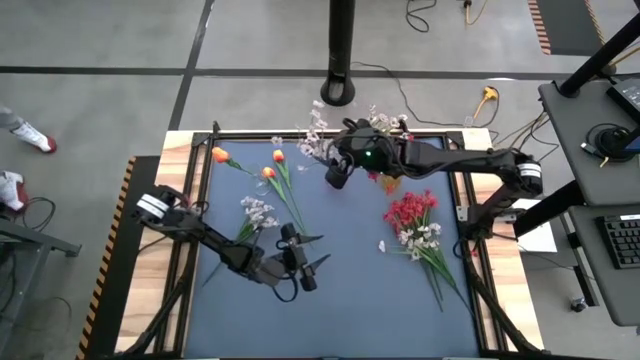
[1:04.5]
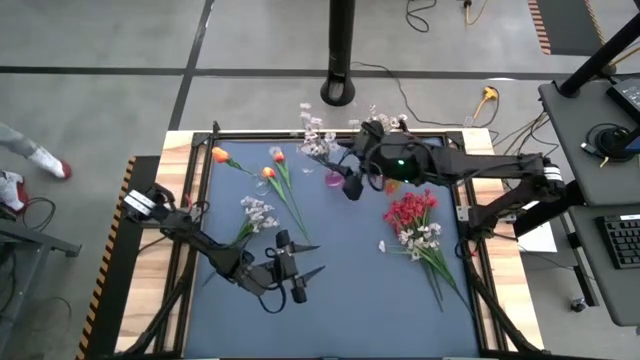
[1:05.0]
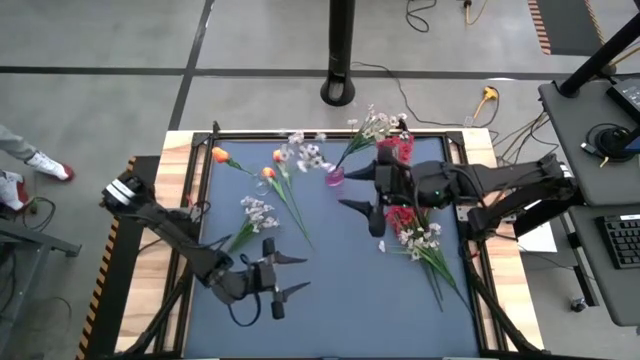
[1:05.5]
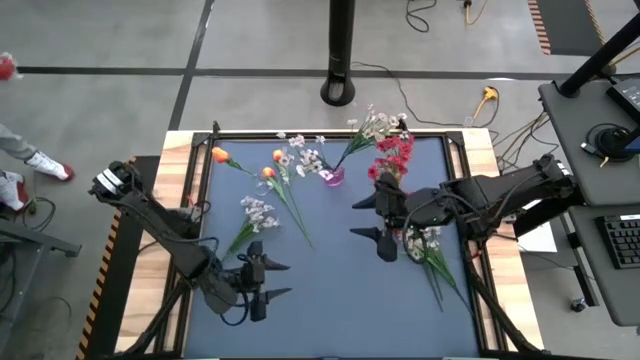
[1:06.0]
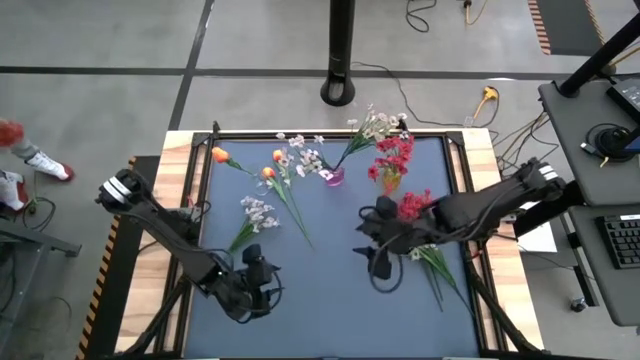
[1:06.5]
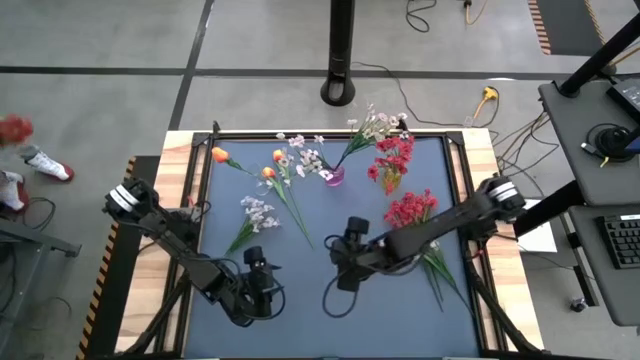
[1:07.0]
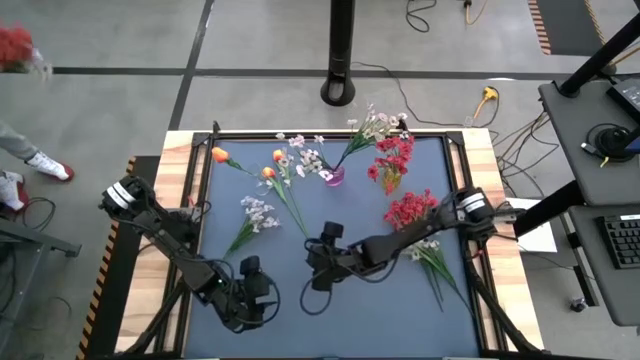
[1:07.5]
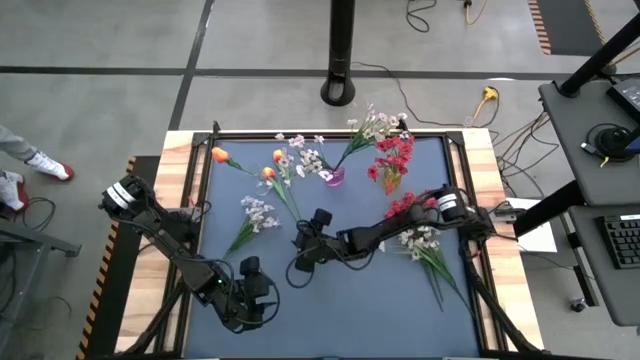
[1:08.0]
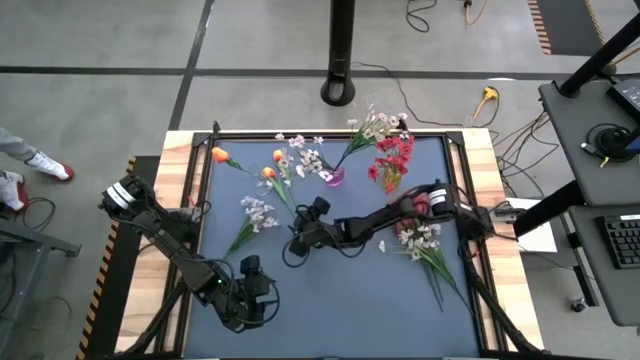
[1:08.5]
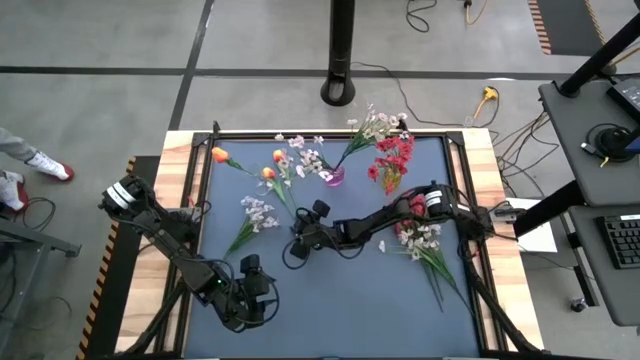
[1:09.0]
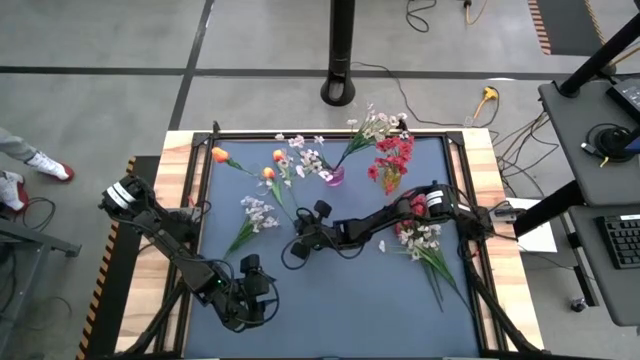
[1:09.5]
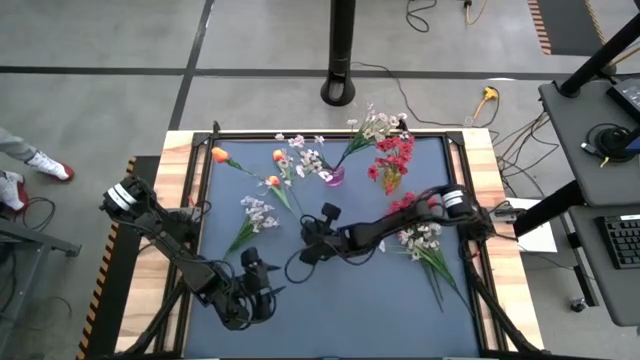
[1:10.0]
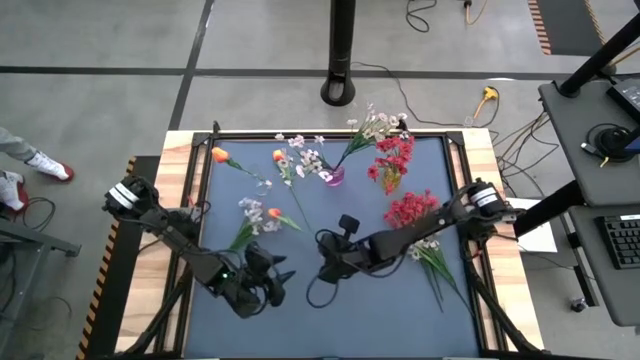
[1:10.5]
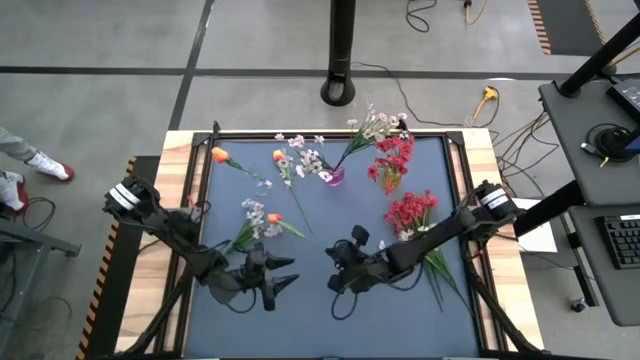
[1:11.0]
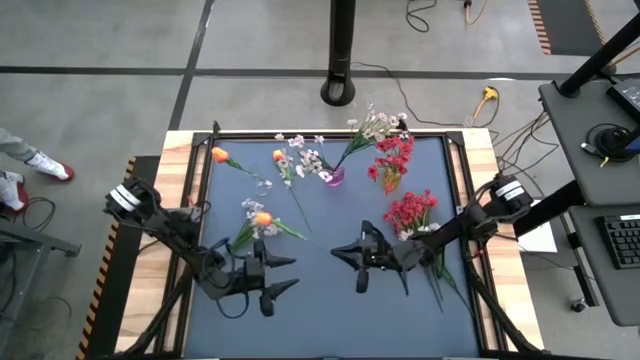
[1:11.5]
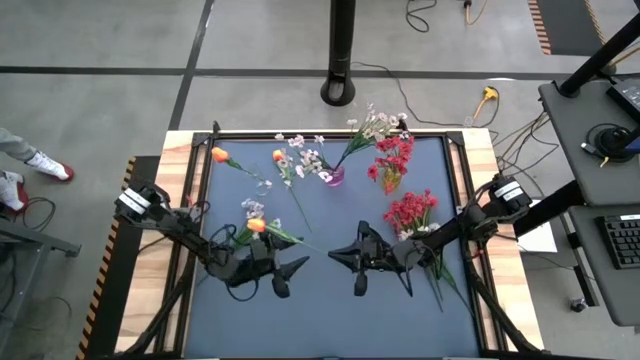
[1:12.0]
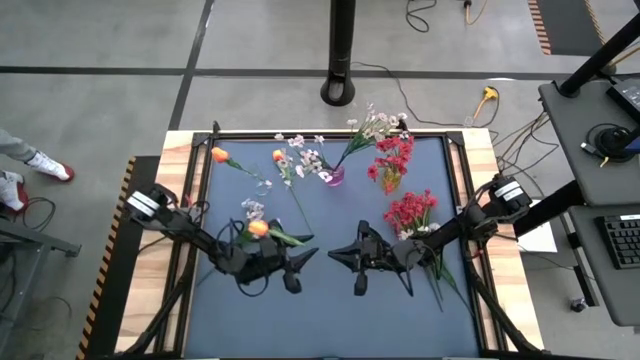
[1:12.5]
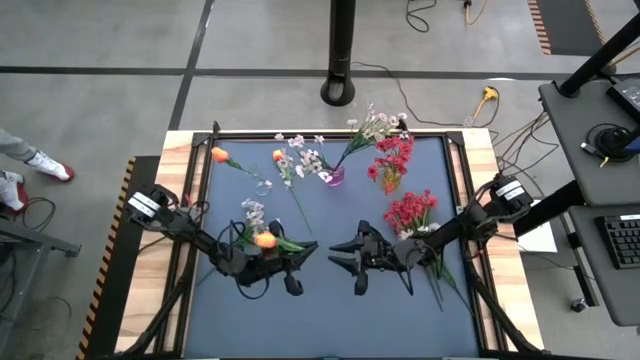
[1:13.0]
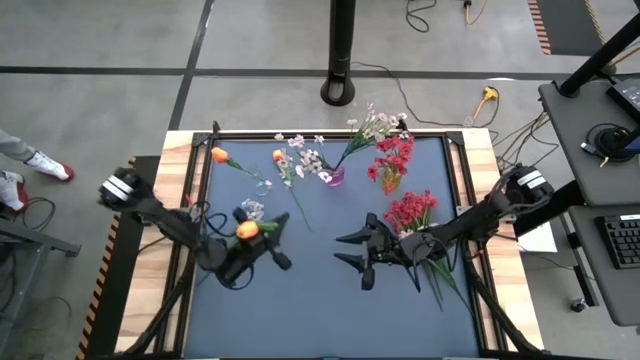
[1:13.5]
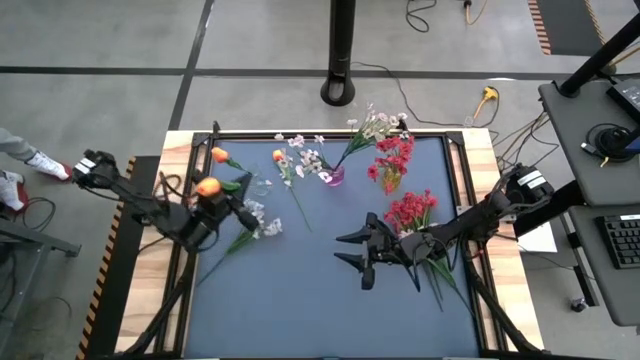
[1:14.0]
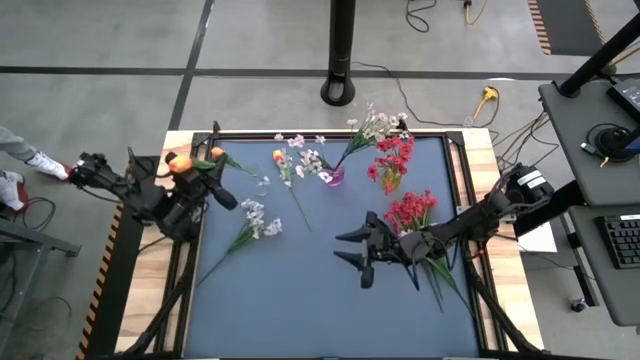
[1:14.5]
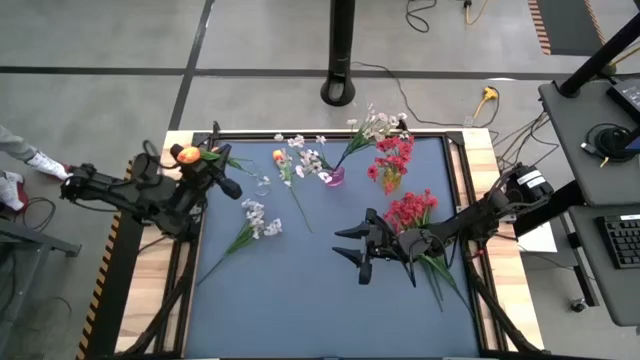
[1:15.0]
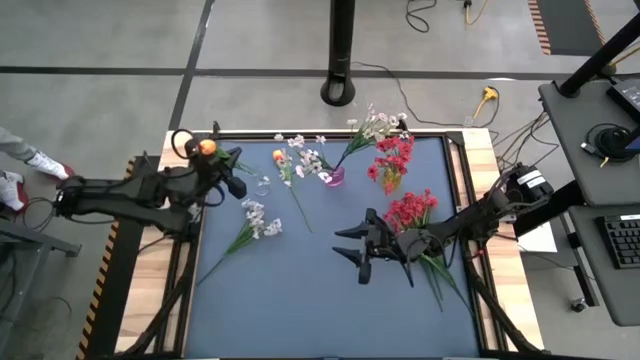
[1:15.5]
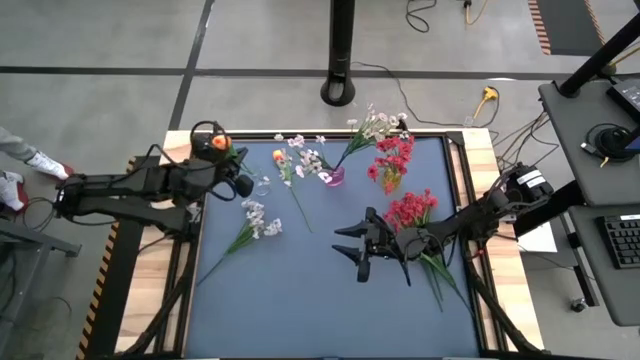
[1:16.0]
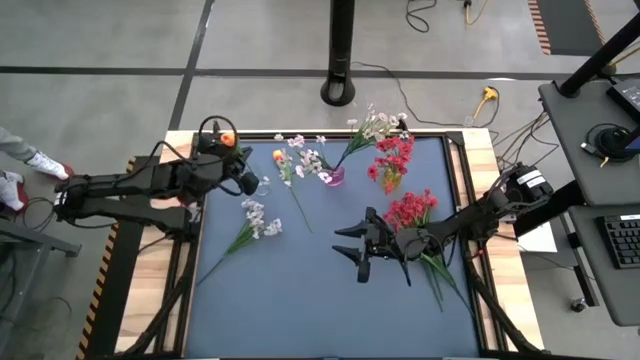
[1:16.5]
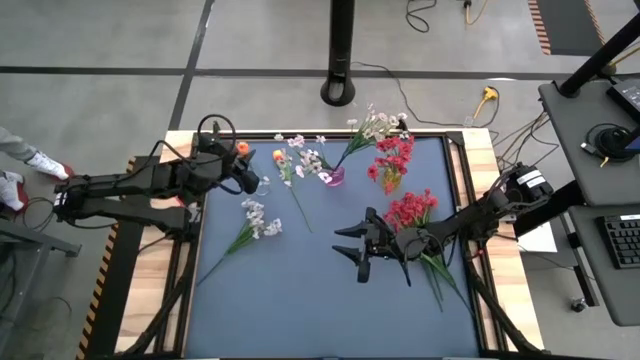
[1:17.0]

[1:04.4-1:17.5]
Task: Sort flowers into vase by color
Put the orange tulip into the transparent vase

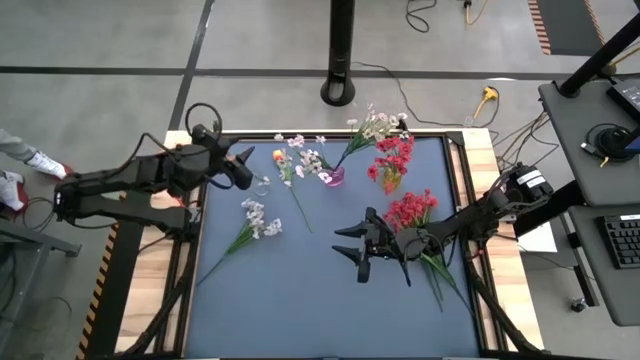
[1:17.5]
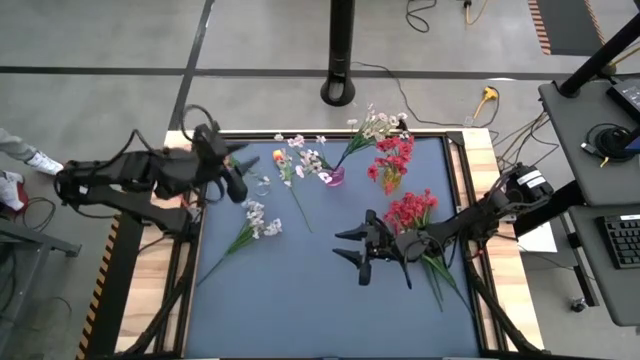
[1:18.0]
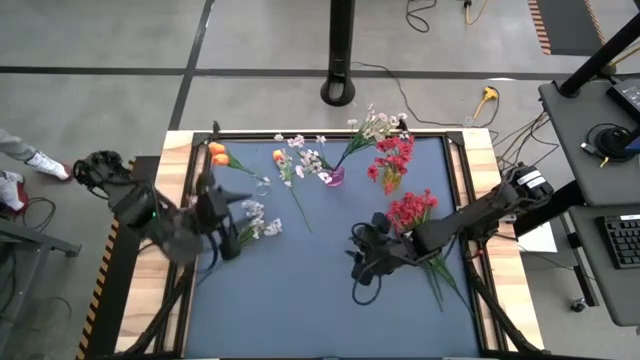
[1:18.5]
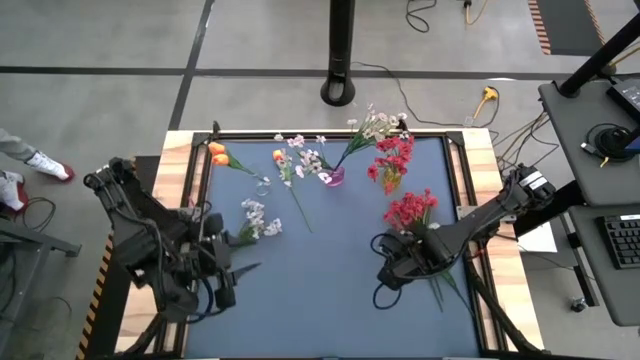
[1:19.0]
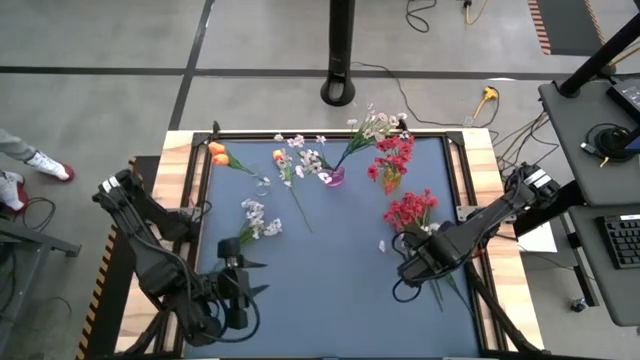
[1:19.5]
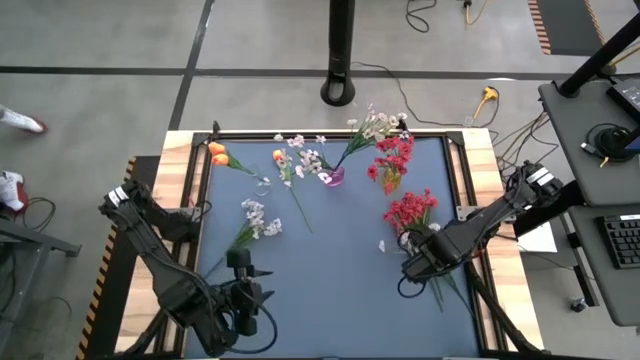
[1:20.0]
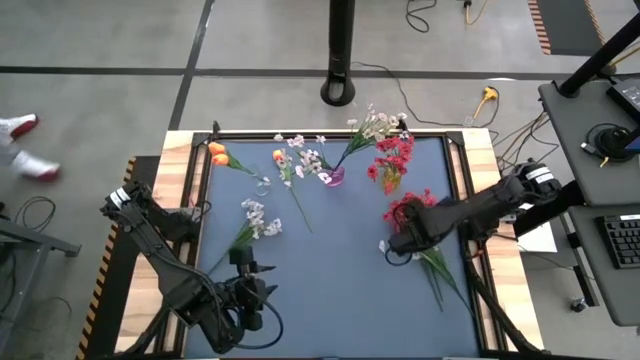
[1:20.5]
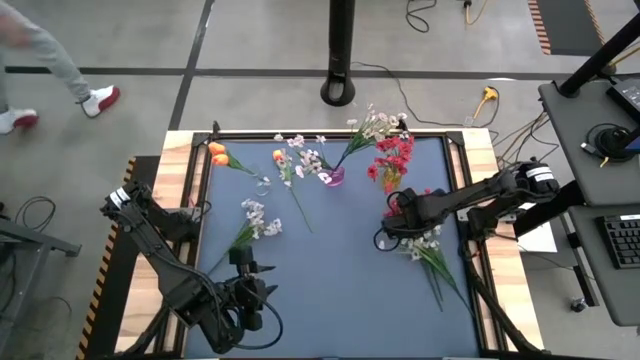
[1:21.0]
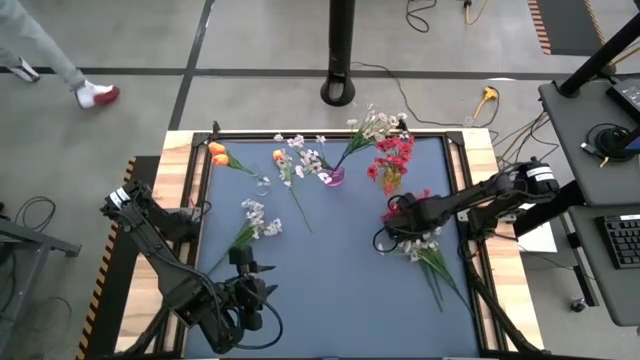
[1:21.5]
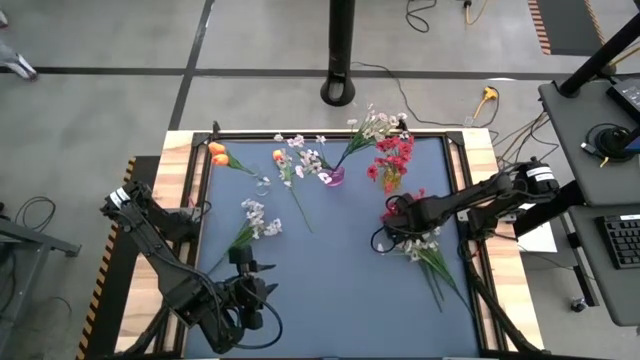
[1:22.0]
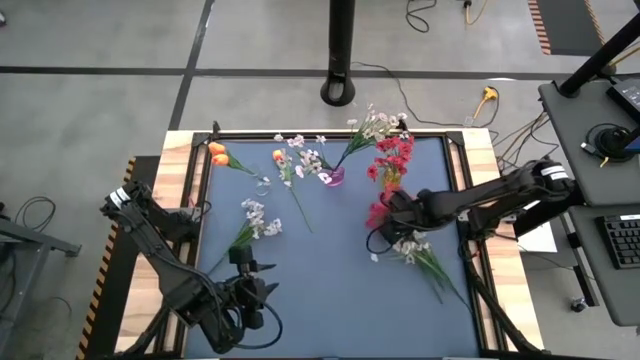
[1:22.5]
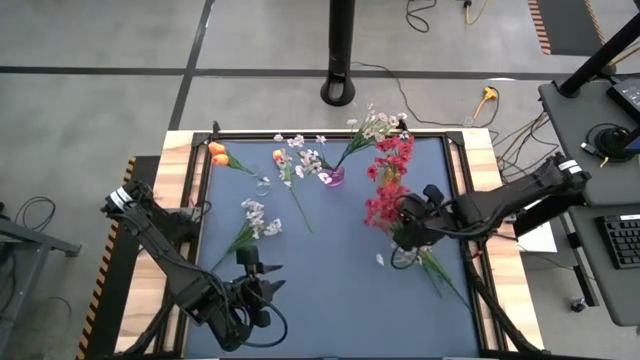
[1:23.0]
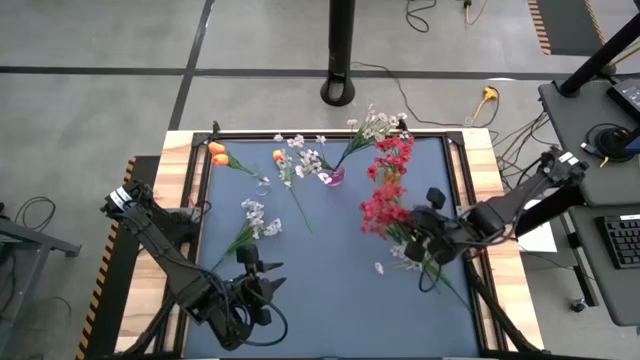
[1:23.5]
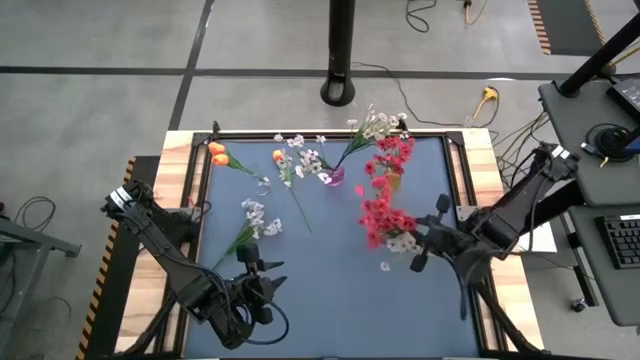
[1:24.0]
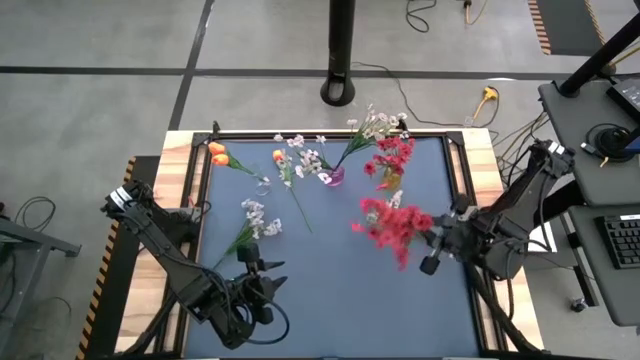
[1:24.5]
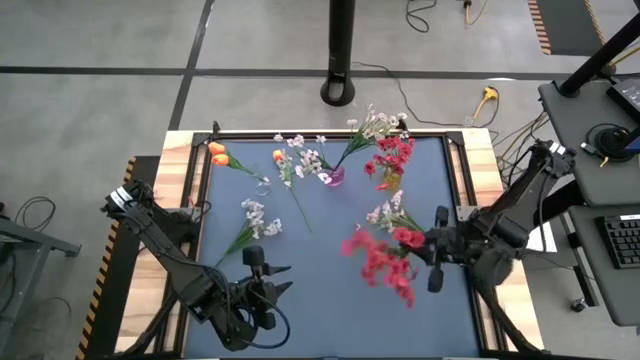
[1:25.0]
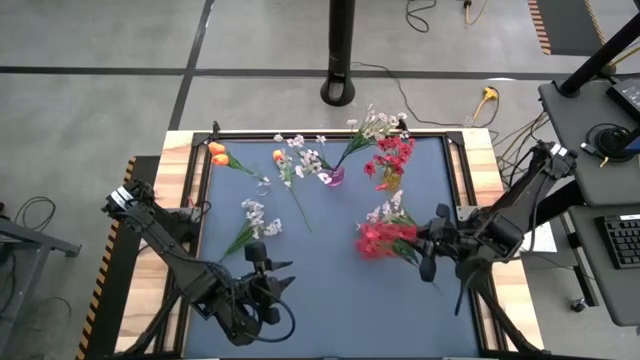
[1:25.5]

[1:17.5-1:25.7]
Prepare the red flowers
